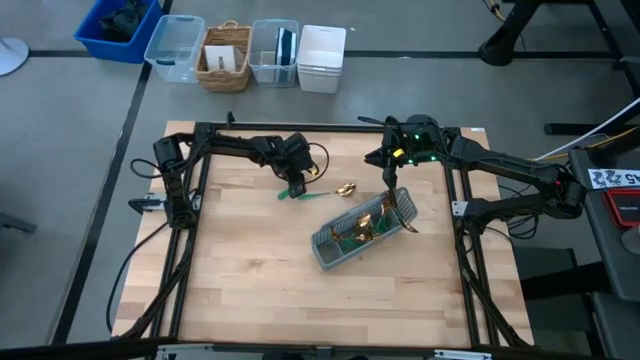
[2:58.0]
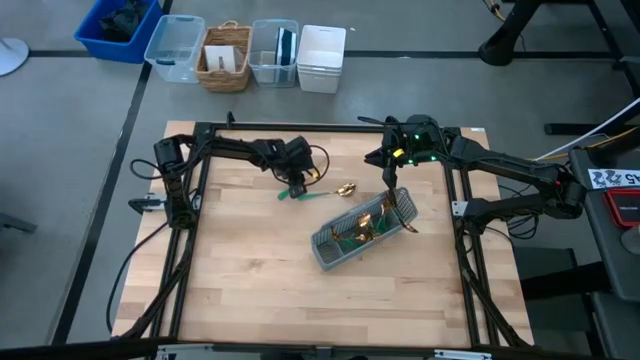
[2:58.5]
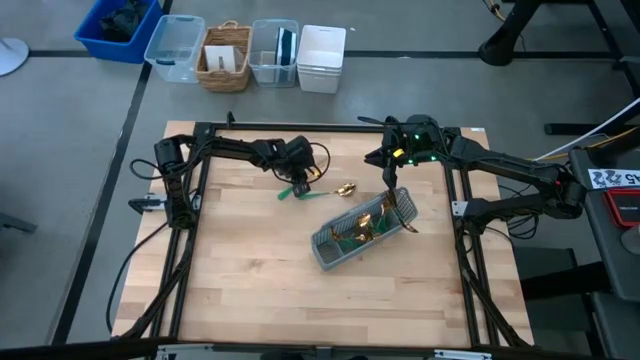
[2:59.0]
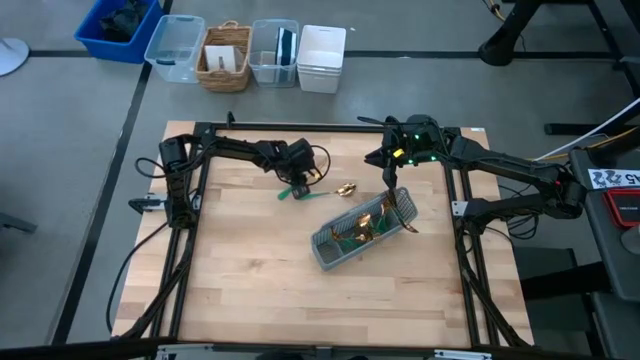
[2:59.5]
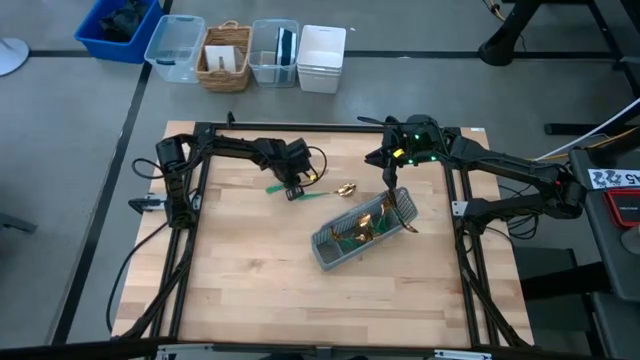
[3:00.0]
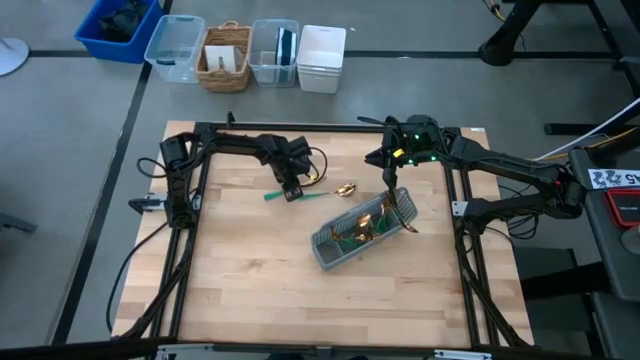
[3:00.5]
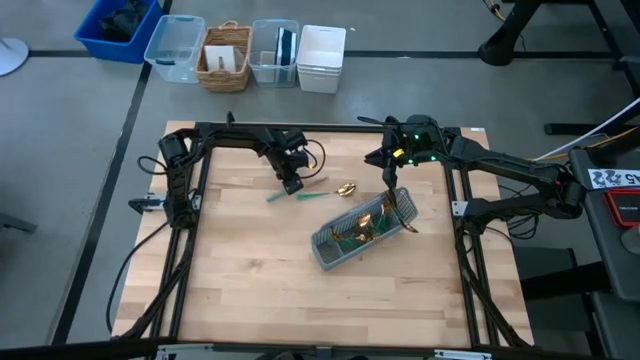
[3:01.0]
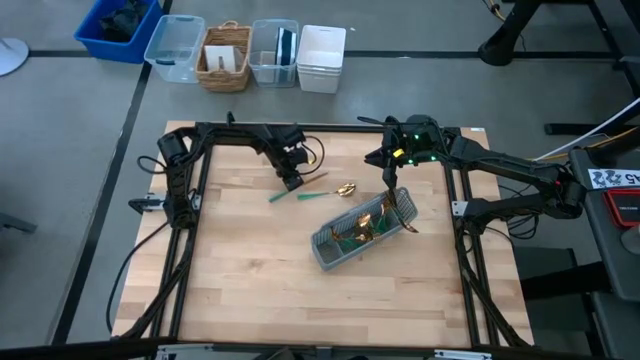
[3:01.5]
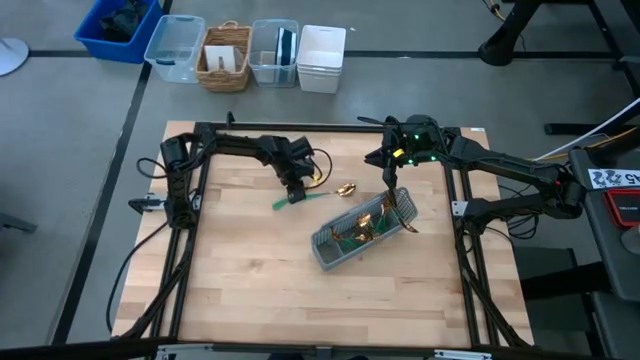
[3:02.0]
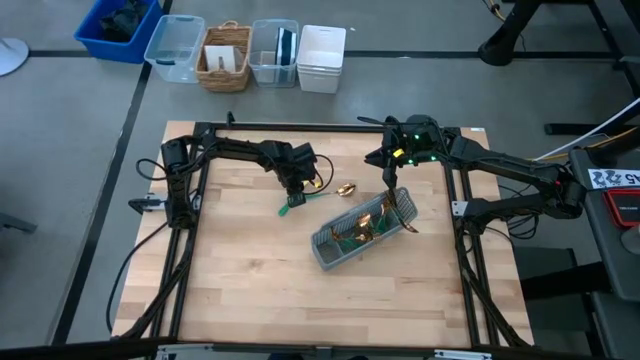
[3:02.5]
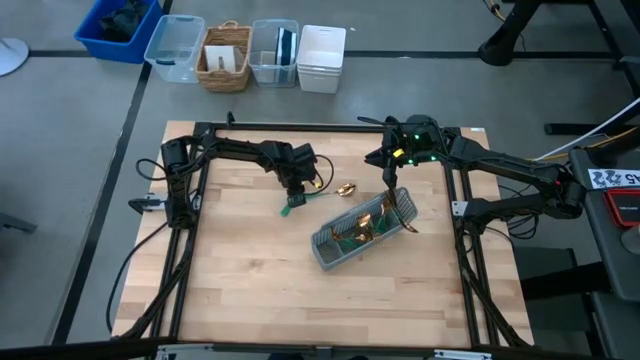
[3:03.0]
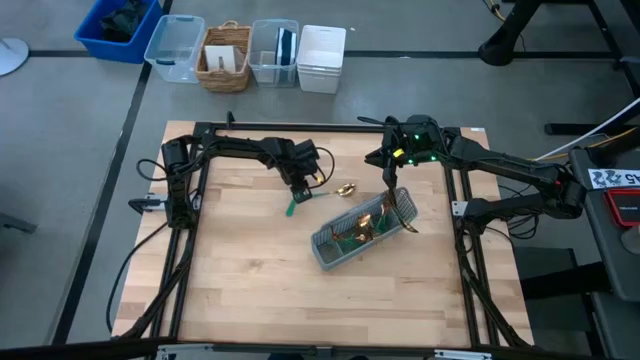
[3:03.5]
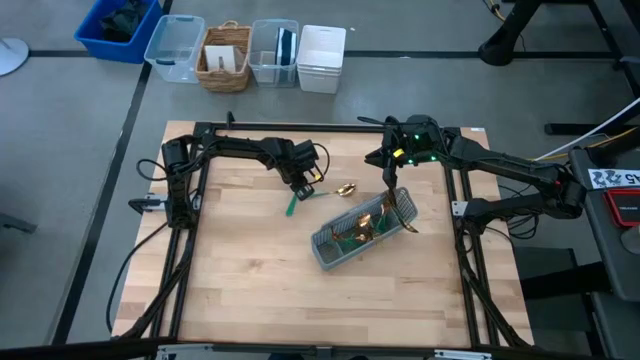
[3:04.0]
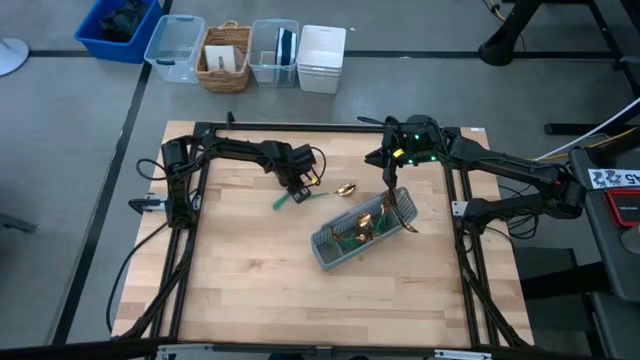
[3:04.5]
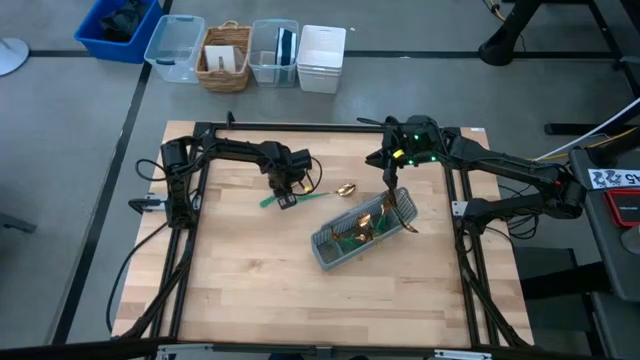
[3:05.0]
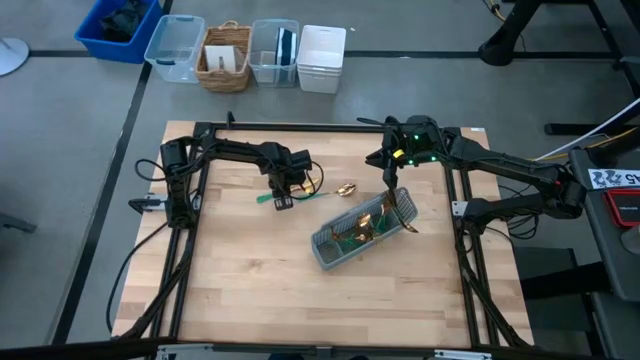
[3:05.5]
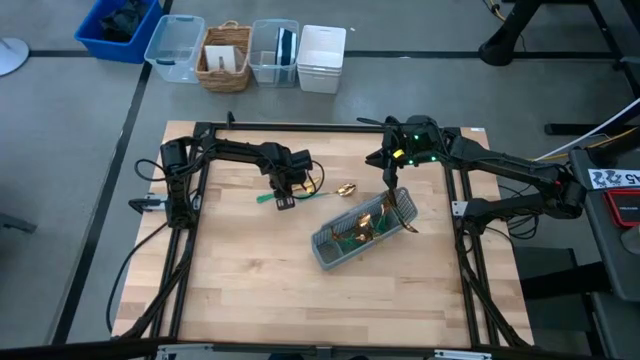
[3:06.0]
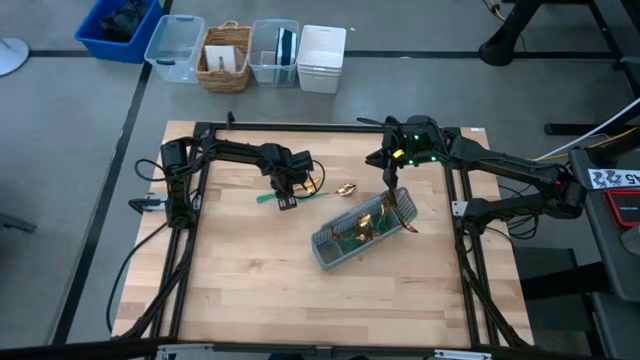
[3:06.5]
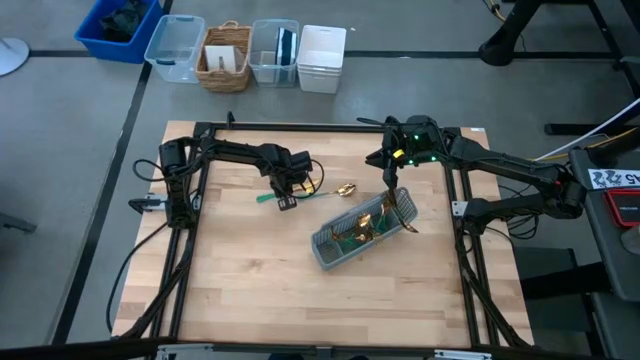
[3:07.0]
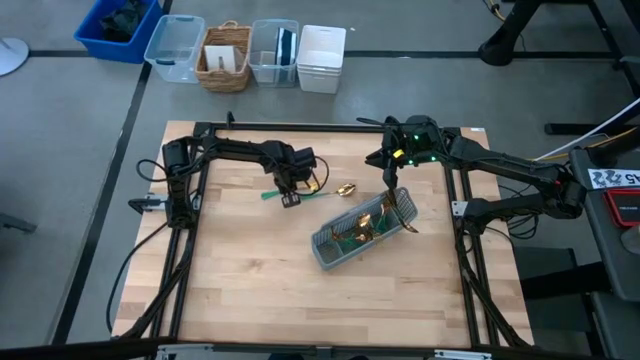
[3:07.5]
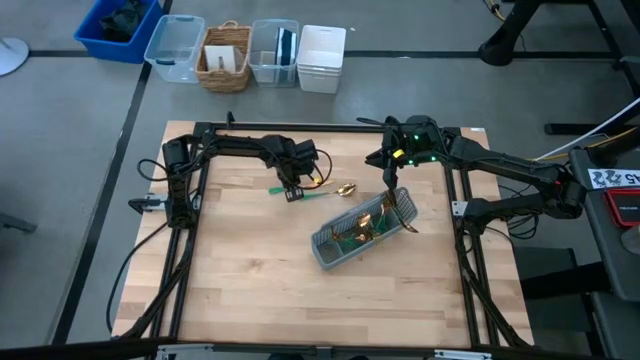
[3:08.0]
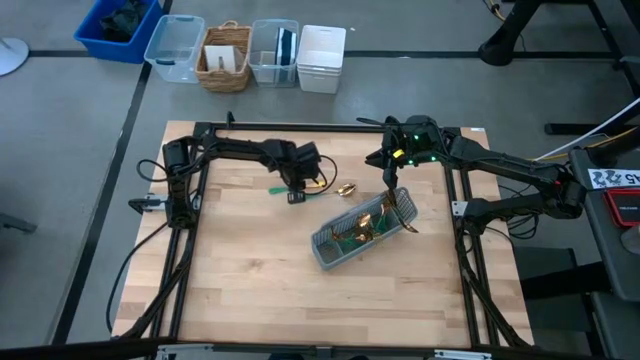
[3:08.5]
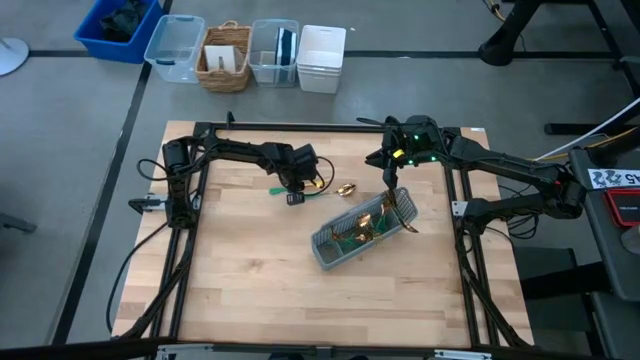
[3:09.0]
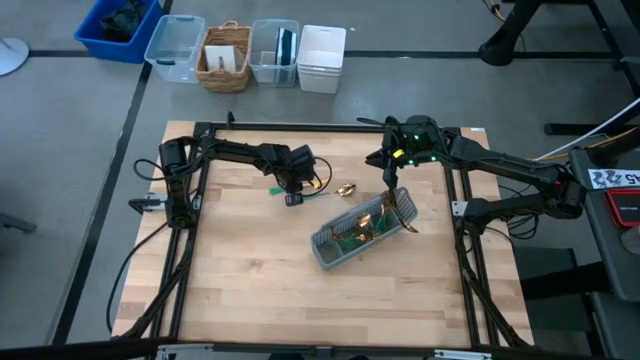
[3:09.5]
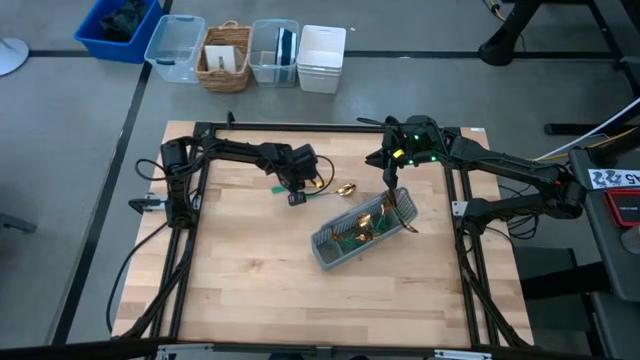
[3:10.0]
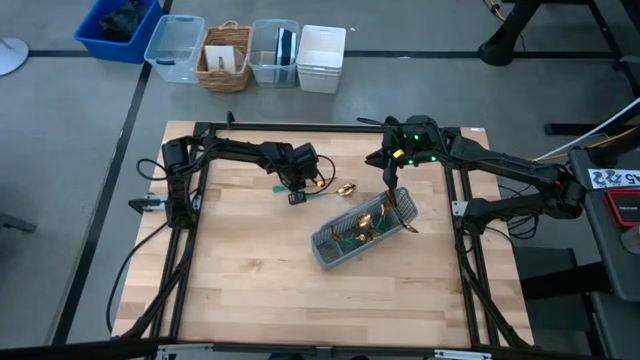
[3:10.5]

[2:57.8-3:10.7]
Task: Sort silverware
Put the knife into the gray silverware organizer

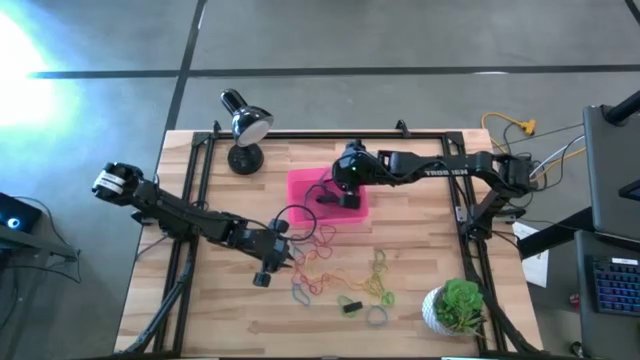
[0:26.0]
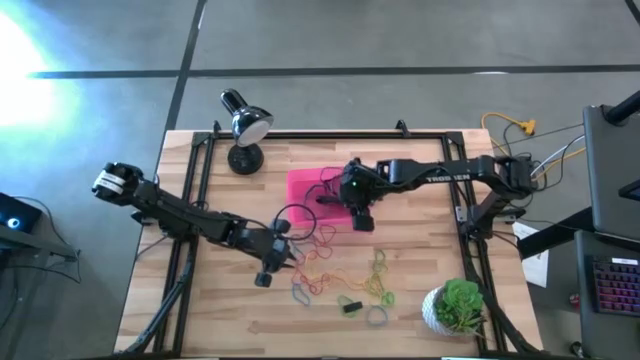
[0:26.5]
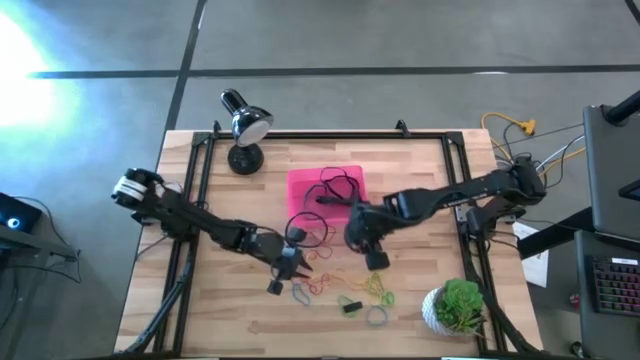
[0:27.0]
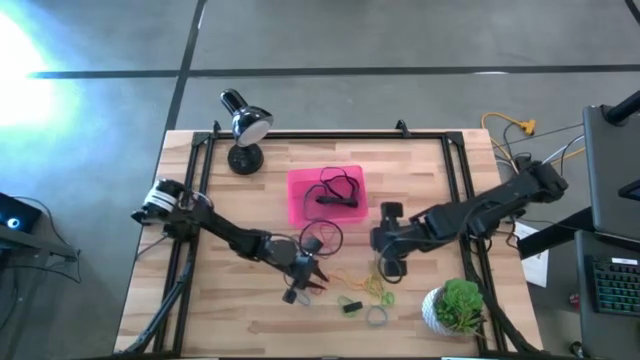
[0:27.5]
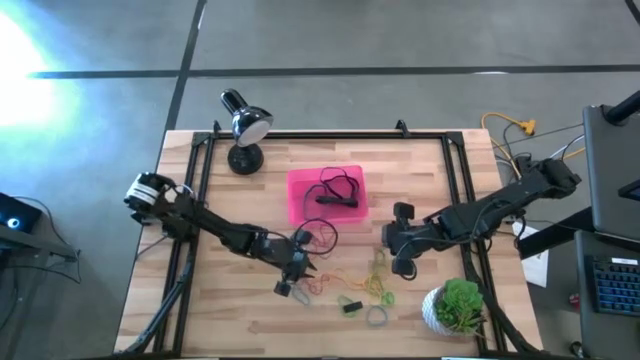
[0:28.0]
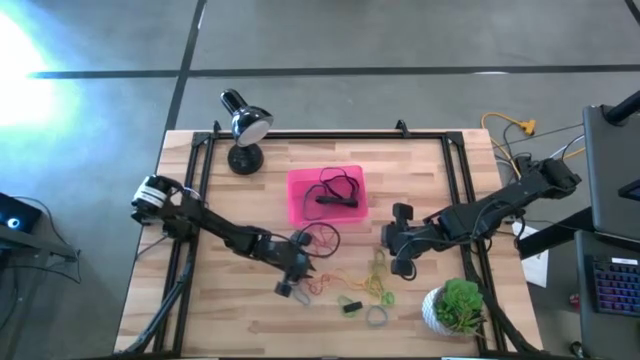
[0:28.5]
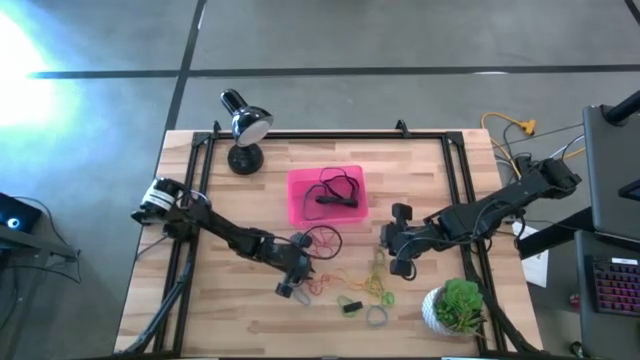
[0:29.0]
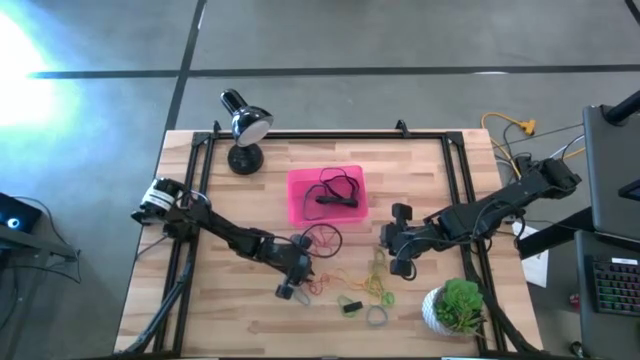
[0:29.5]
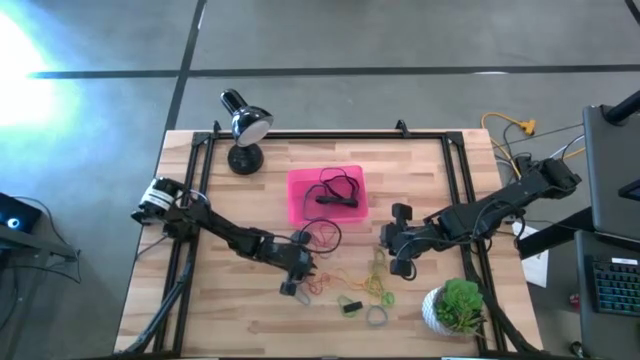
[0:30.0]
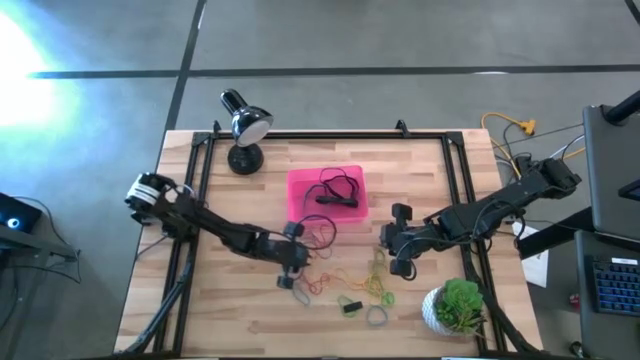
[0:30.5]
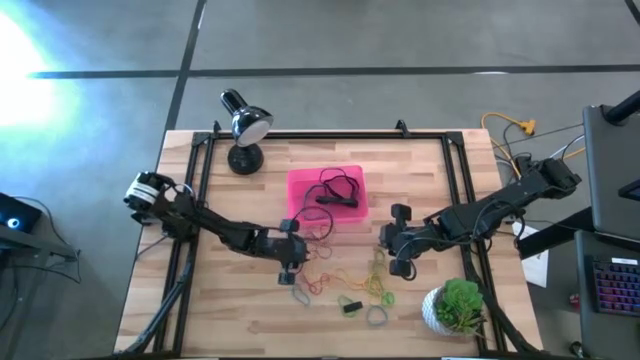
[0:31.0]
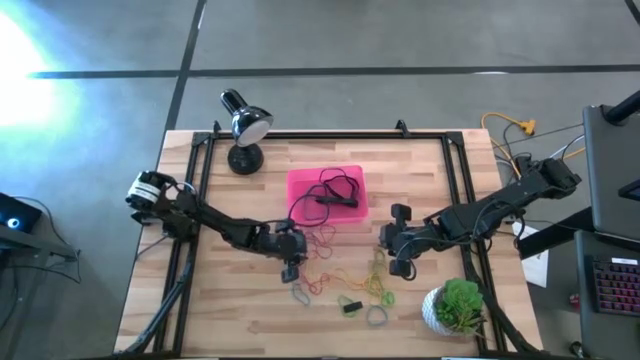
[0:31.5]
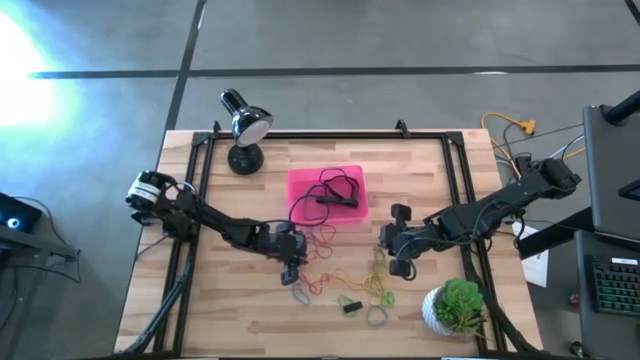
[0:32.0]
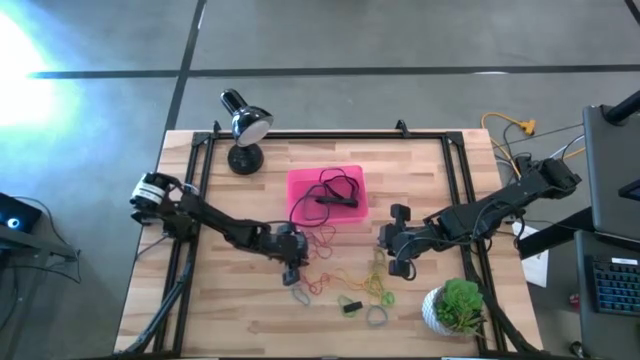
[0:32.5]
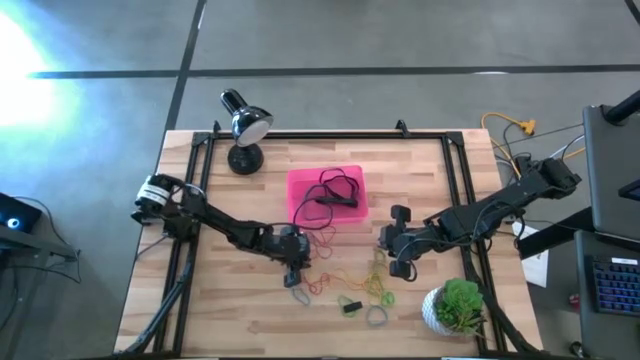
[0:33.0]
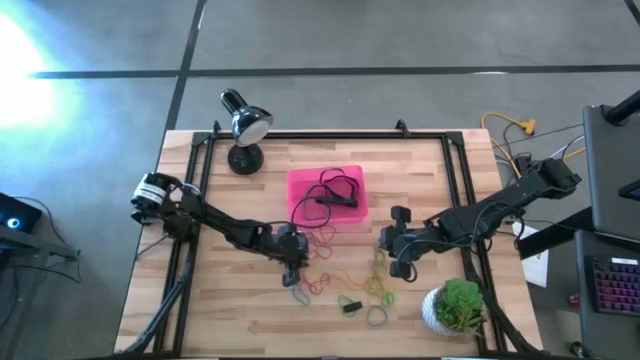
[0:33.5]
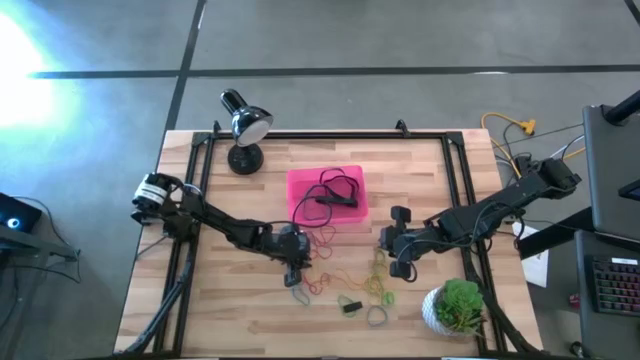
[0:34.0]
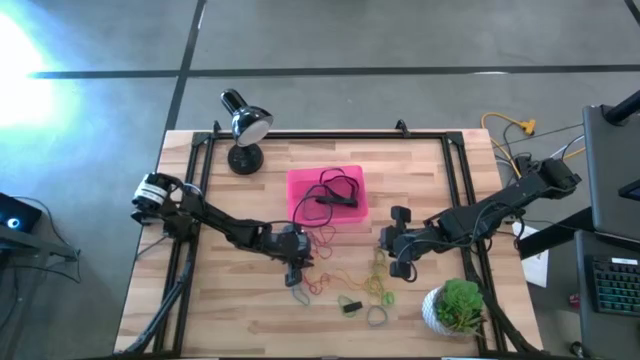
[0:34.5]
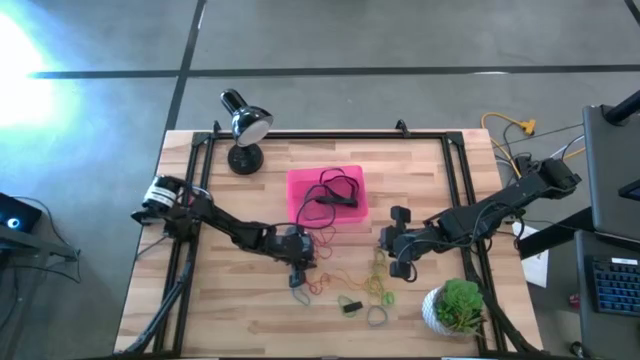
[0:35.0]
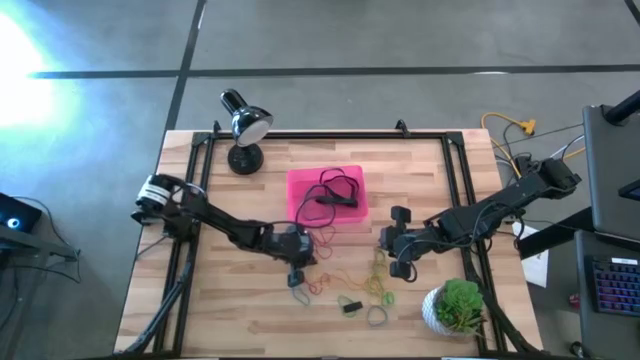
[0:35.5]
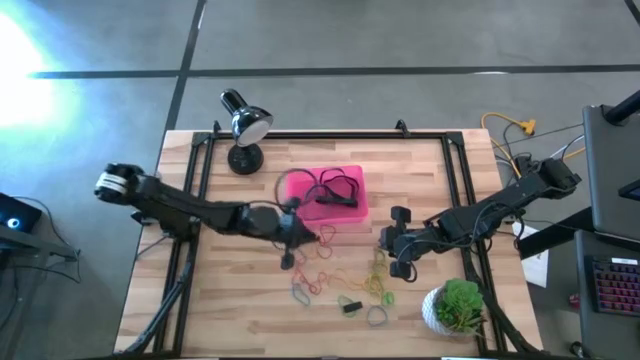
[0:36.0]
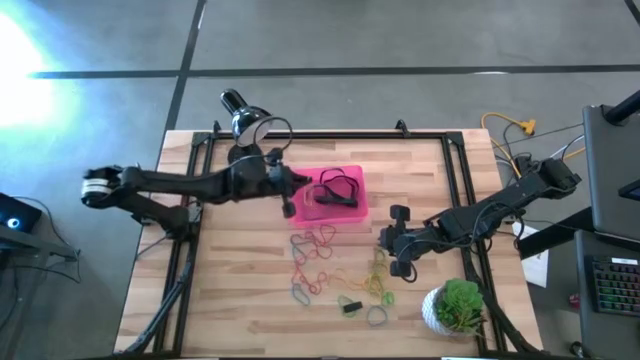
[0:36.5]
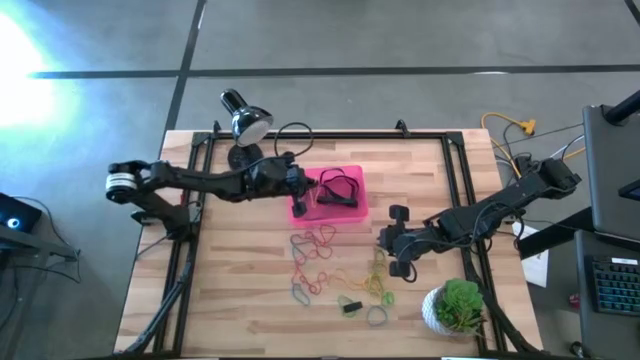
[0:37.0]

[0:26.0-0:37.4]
Task: Pick and place rubber bands into bin
Put the yellow rubber band into the red bin
